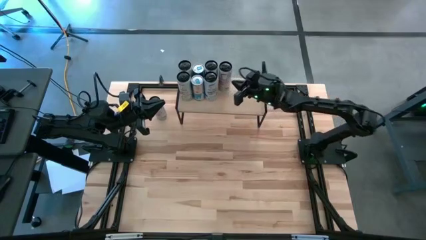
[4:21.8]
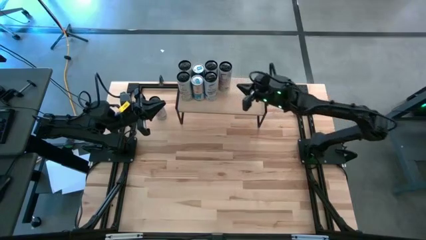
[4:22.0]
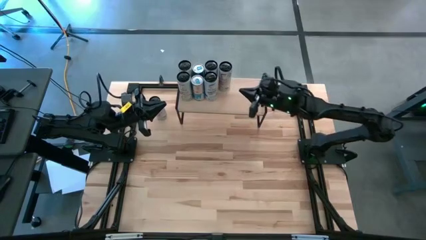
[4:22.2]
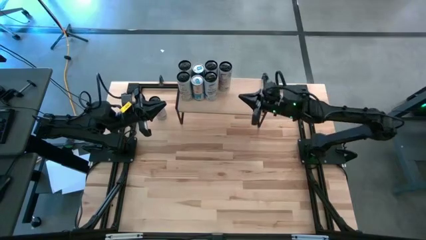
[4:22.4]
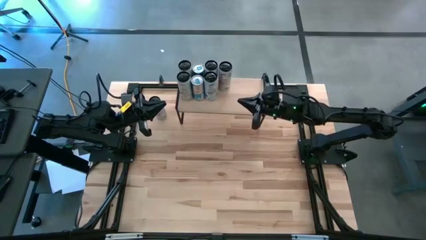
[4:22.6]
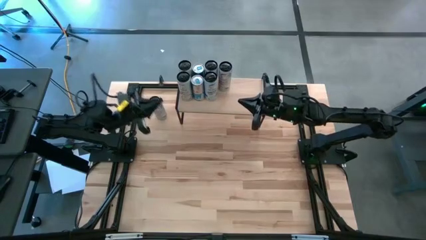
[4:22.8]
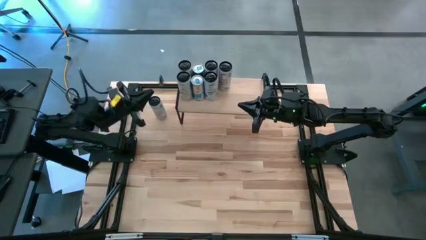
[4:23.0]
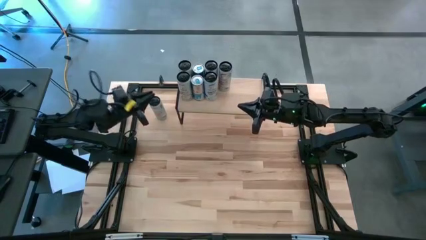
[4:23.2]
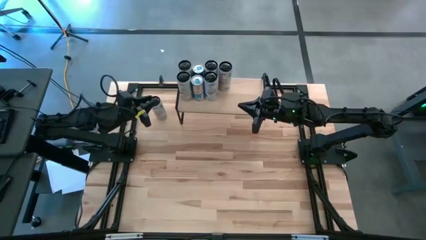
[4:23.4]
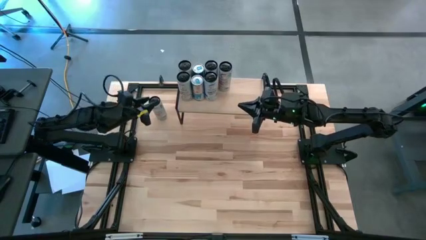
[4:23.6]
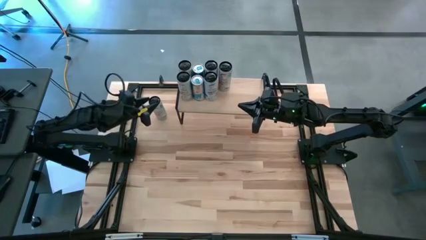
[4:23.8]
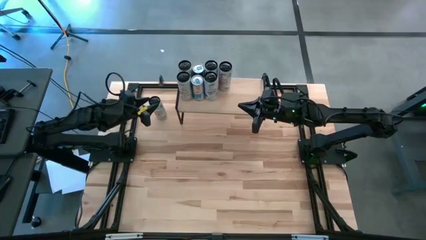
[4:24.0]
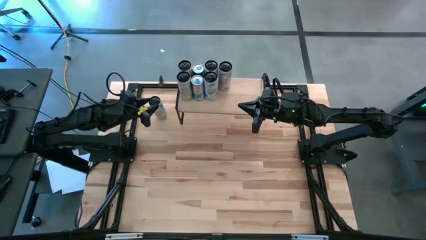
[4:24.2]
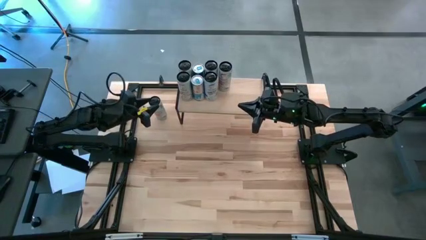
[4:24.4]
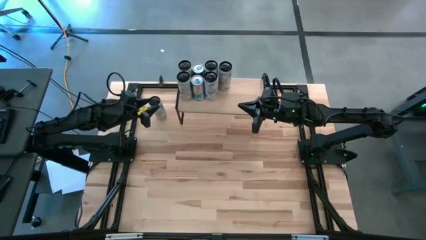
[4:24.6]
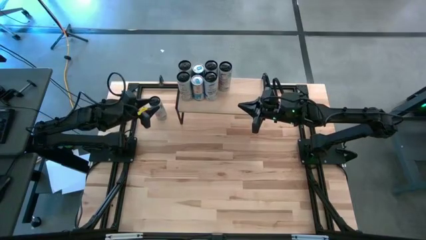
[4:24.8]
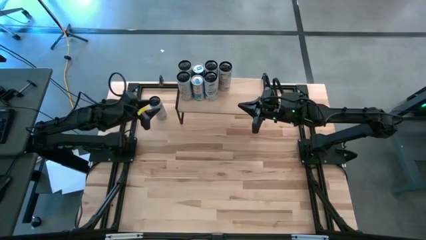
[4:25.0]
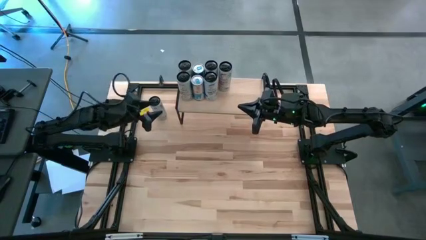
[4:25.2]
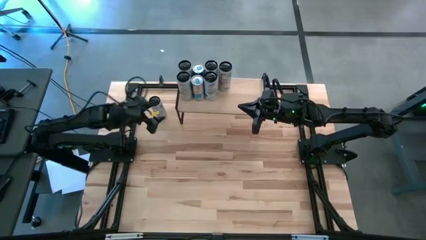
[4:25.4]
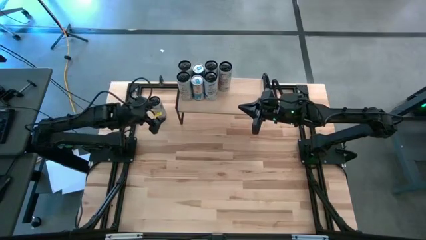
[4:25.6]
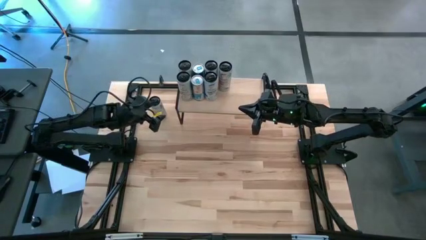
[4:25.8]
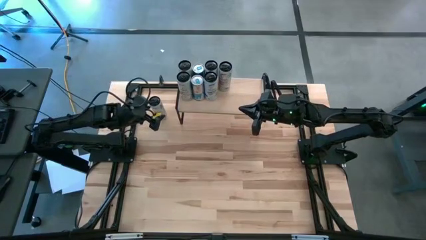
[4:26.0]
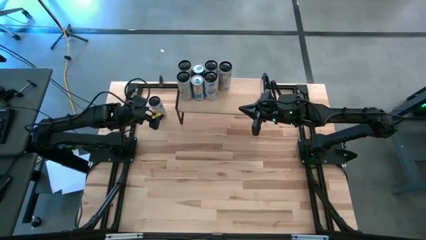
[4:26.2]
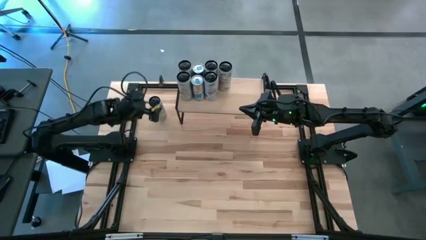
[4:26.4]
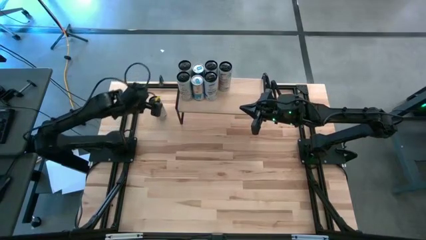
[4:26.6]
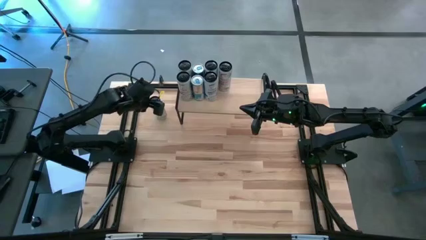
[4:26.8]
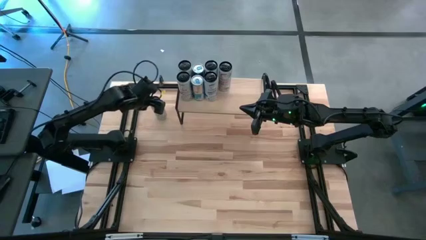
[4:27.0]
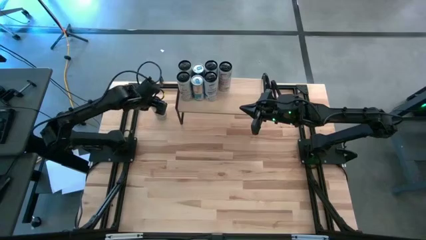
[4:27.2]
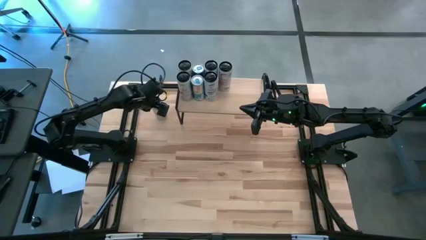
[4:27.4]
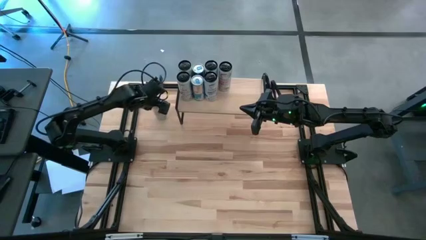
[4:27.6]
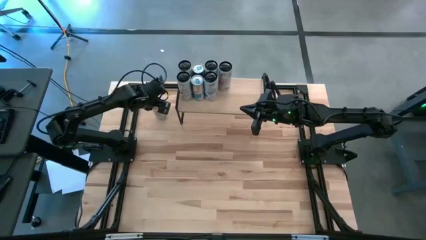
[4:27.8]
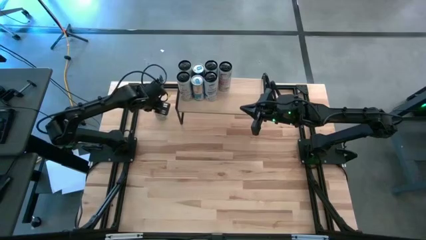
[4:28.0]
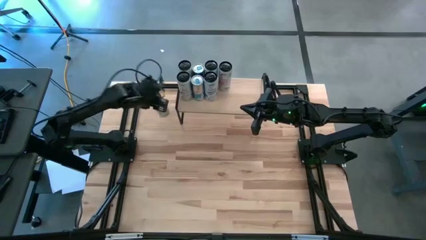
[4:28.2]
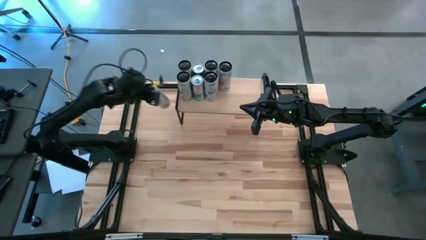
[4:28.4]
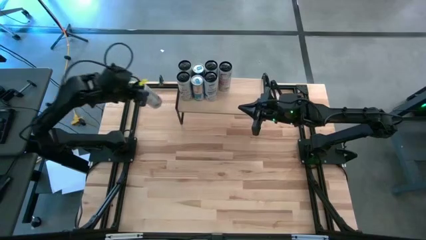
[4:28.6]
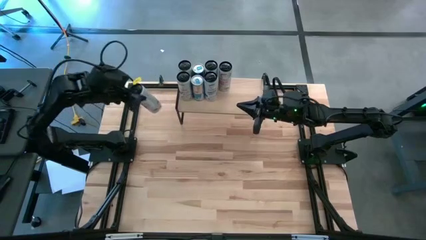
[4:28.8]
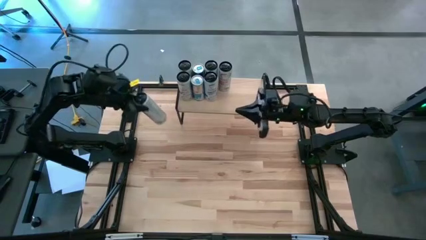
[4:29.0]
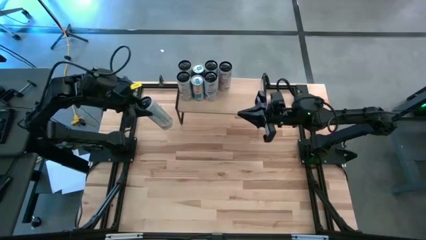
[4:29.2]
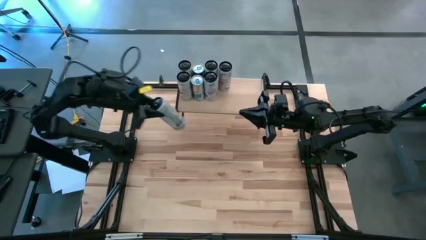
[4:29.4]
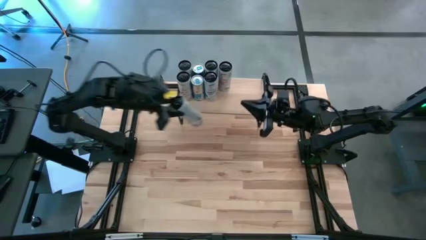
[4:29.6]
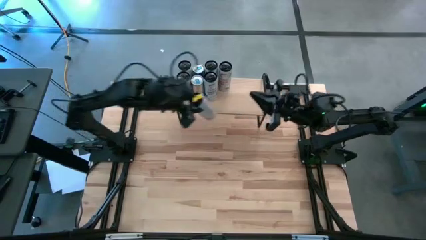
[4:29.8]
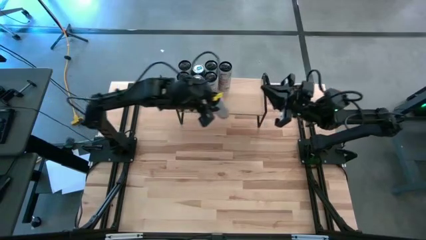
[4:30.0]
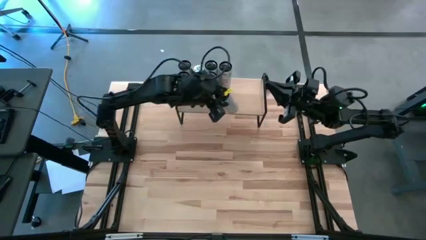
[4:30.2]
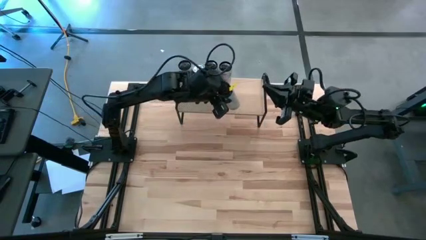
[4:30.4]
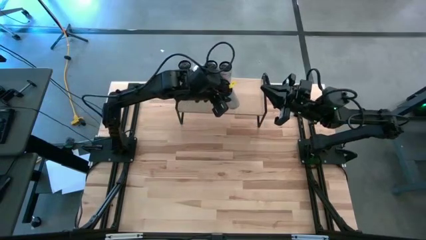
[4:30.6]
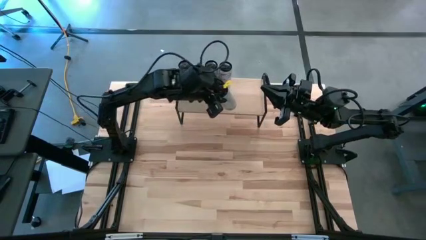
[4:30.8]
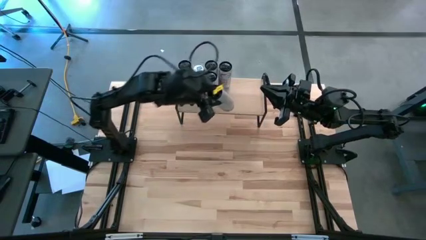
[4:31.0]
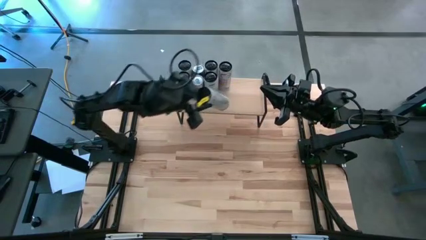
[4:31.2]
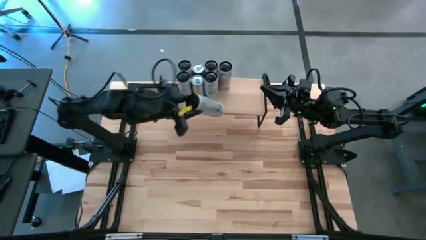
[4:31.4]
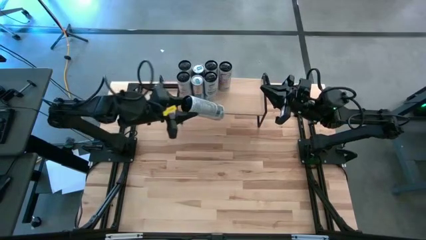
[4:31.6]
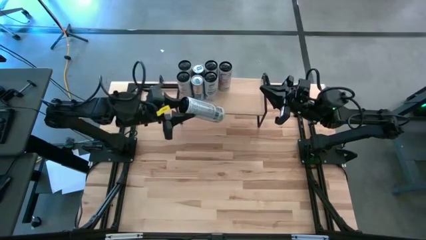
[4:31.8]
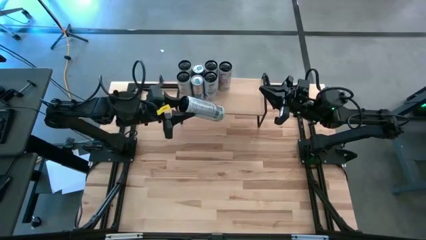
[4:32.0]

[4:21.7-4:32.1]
Task: Place canned beverage on shelf
Put the black soda can on the shelf
